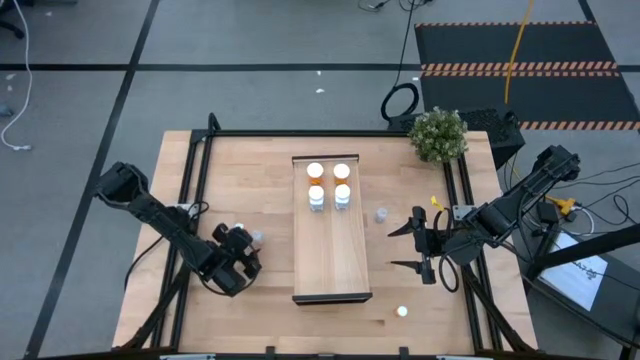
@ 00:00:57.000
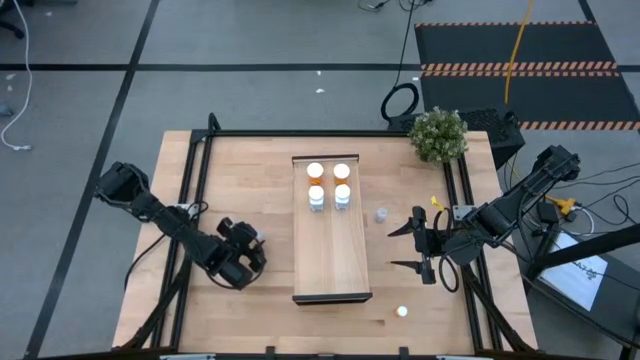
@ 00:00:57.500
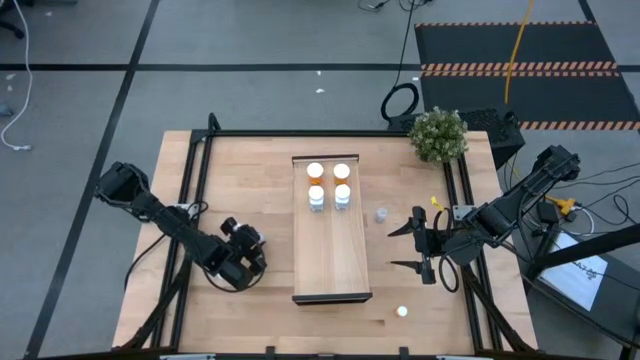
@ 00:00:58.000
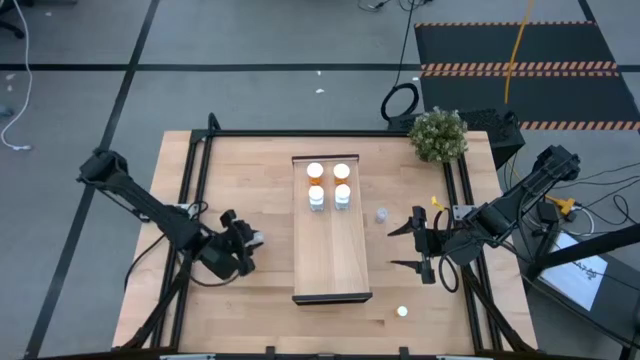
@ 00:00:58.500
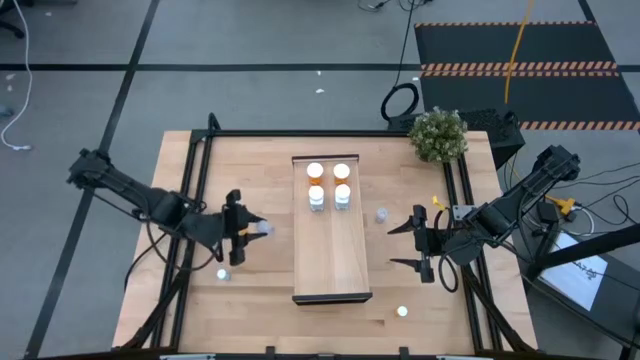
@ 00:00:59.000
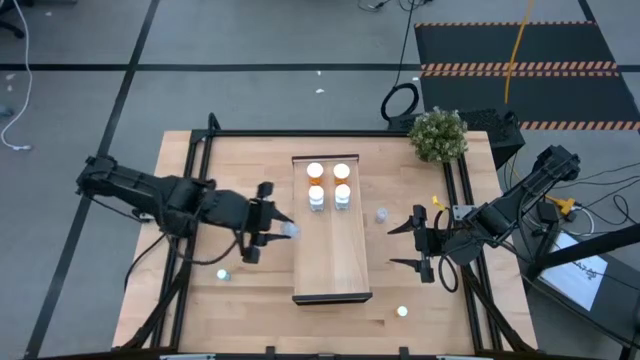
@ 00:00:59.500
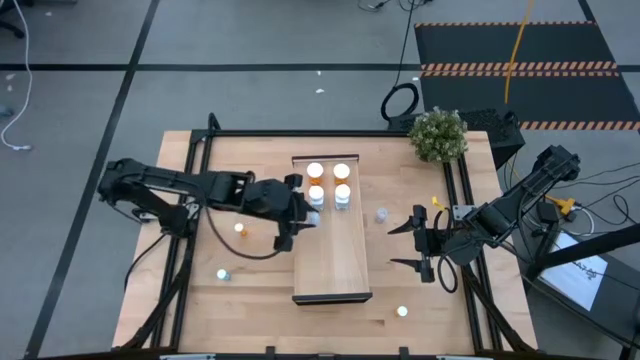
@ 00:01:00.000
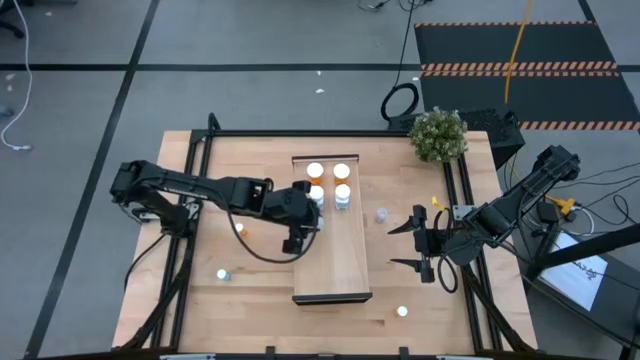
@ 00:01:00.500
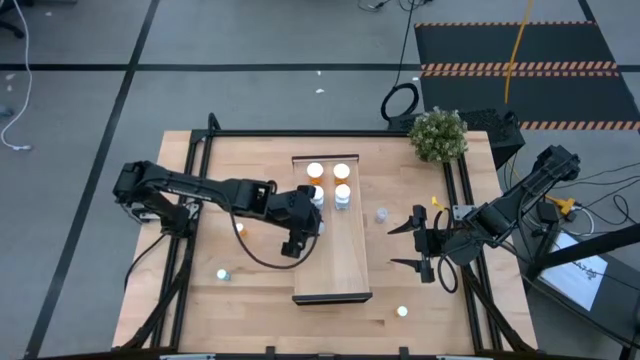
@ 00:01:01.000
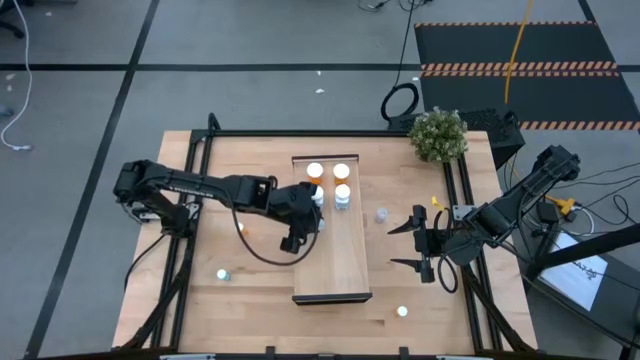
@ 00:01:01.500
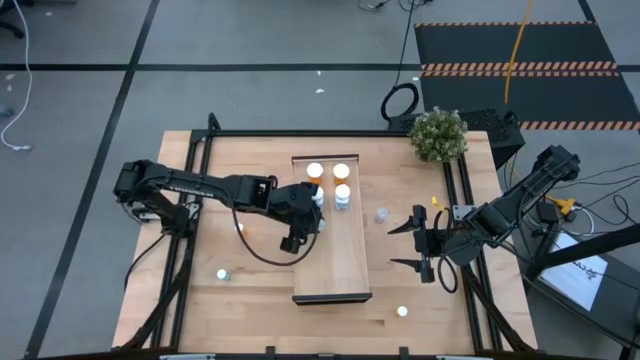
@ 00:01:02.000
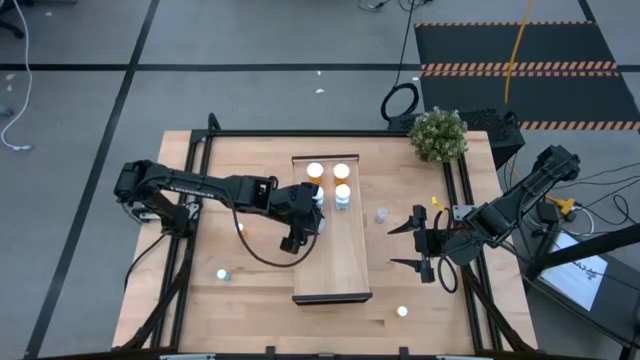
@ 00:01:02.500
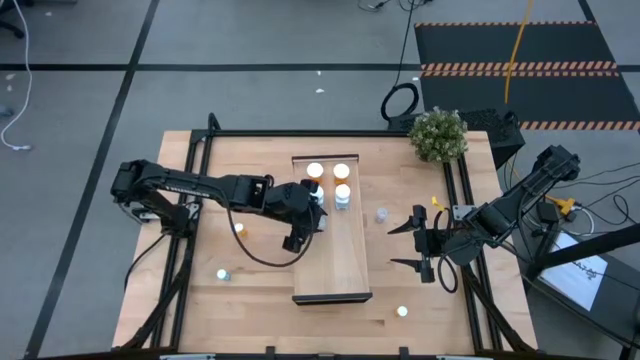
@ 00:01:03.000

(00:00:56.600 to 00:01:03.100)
Task: Pick and place medicine bottles onto shelf by color
Put the bottom transparent pill bottle on the shelf

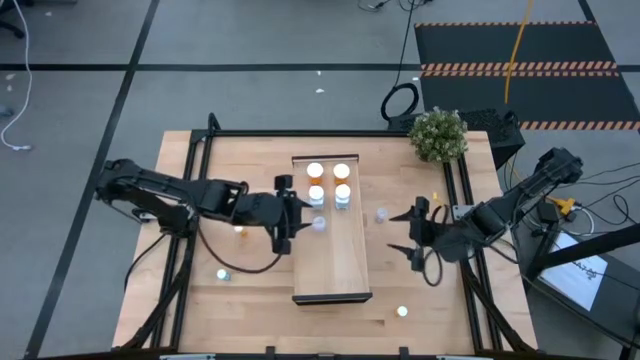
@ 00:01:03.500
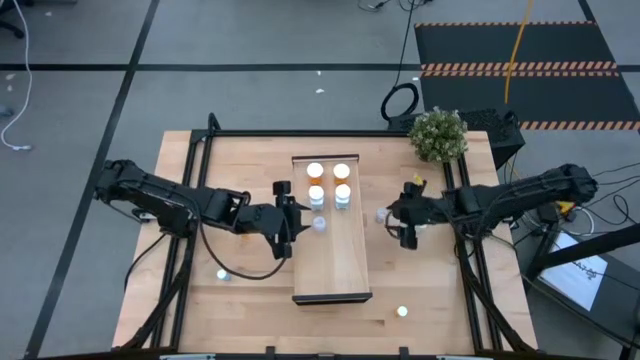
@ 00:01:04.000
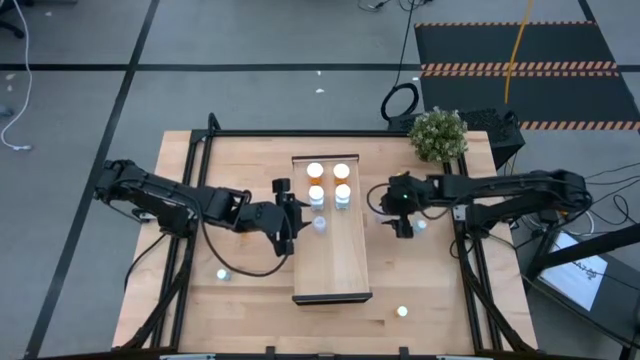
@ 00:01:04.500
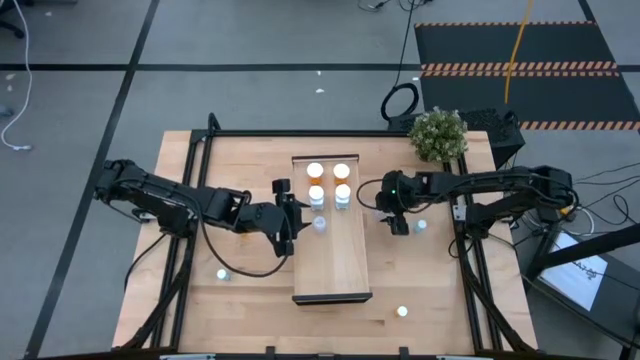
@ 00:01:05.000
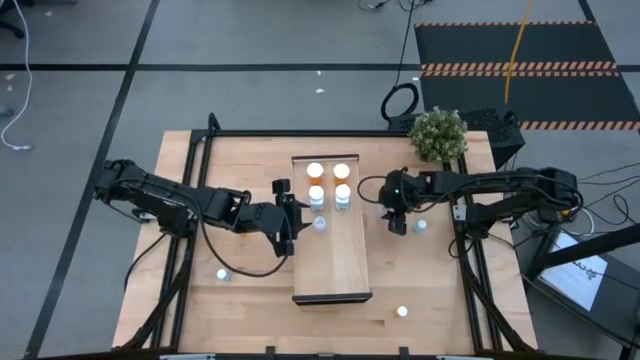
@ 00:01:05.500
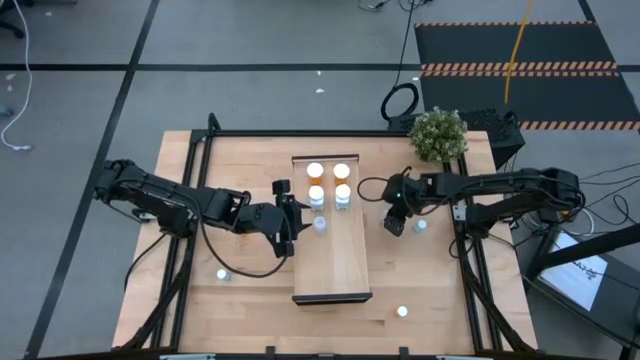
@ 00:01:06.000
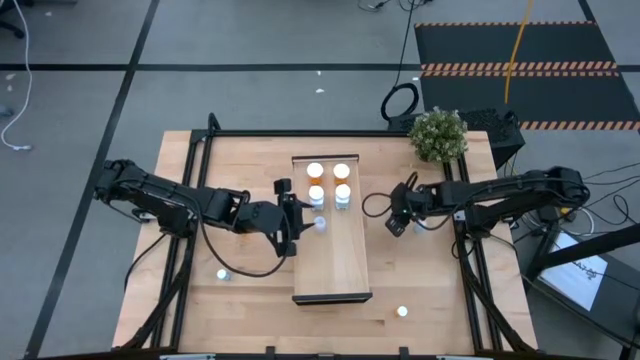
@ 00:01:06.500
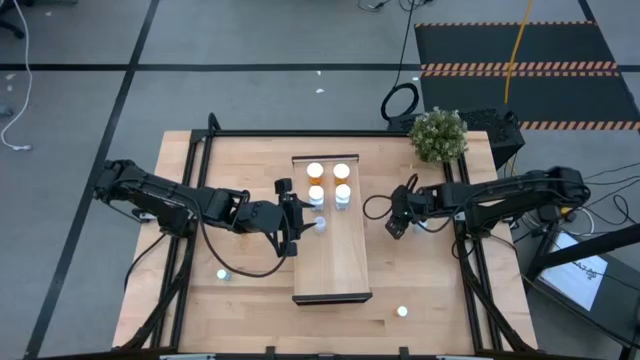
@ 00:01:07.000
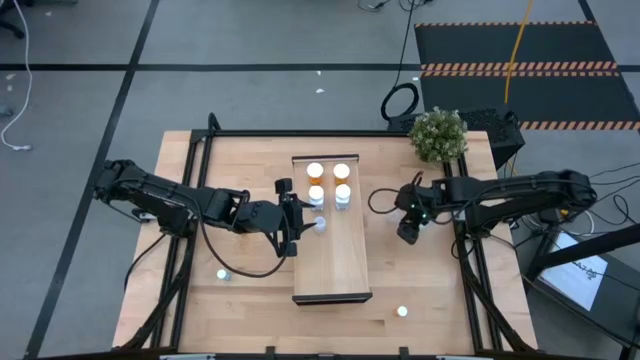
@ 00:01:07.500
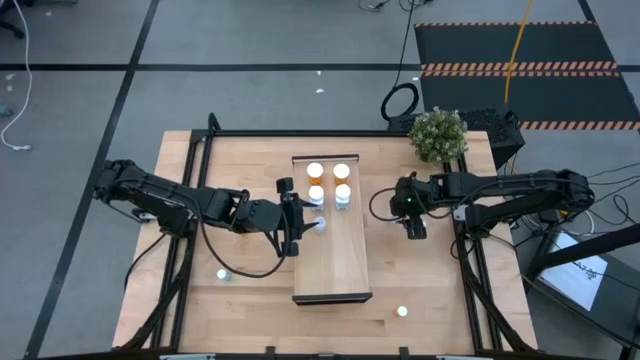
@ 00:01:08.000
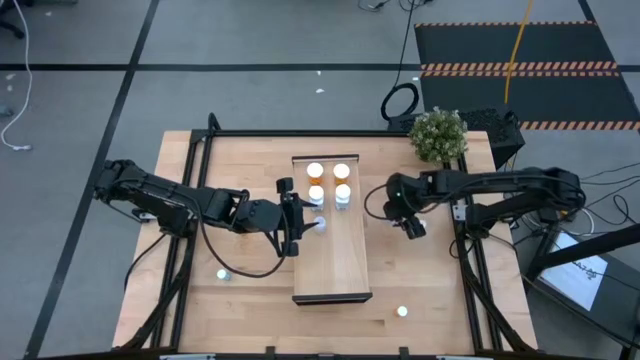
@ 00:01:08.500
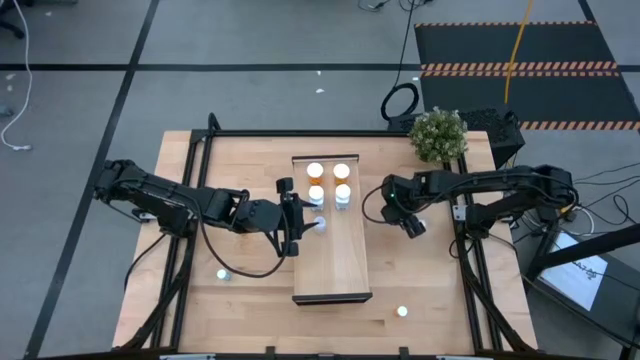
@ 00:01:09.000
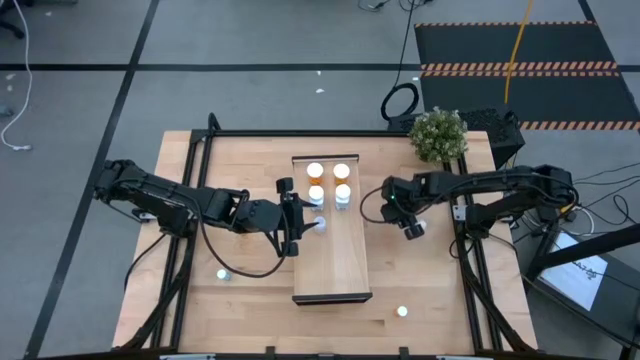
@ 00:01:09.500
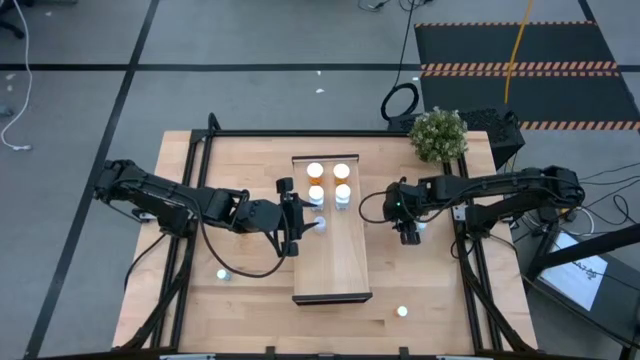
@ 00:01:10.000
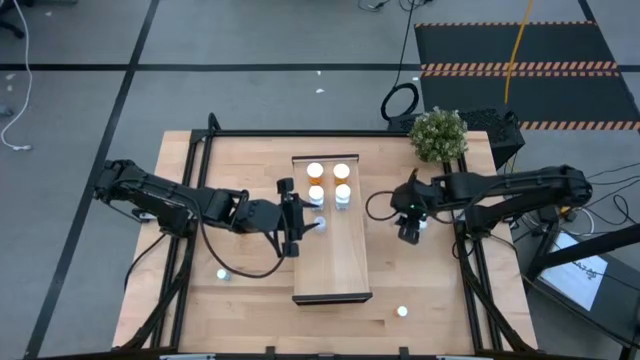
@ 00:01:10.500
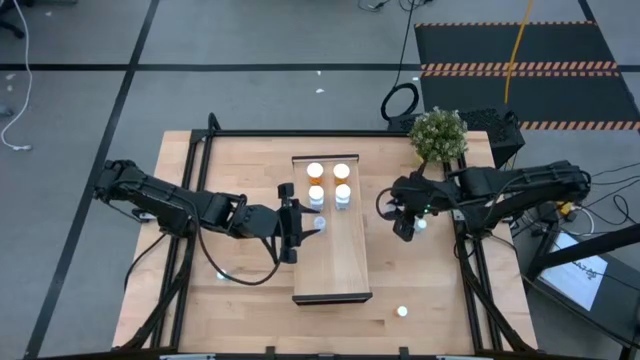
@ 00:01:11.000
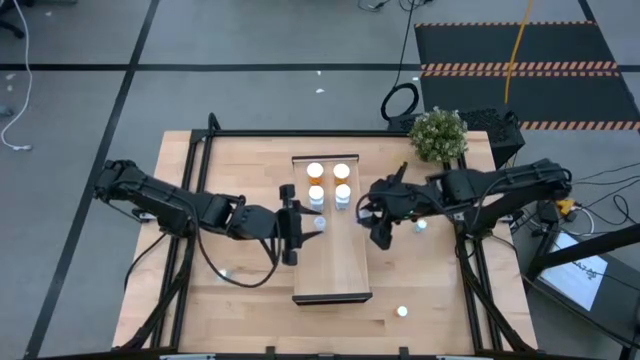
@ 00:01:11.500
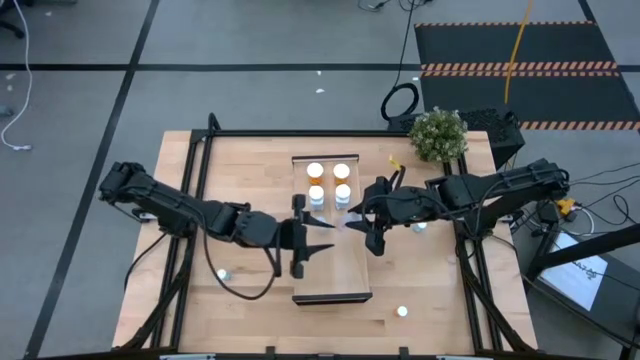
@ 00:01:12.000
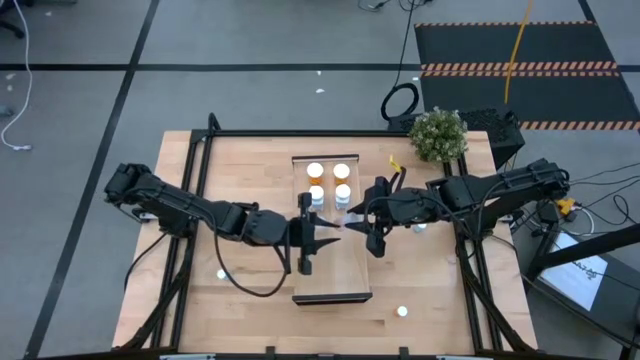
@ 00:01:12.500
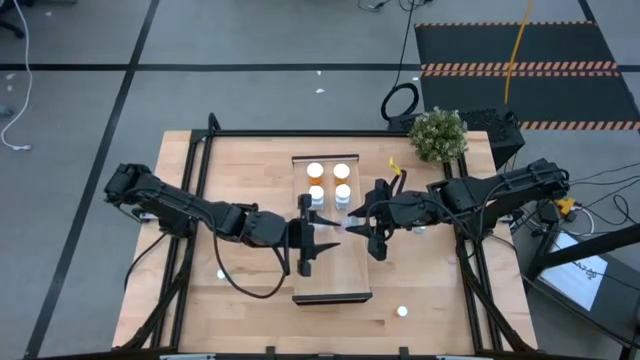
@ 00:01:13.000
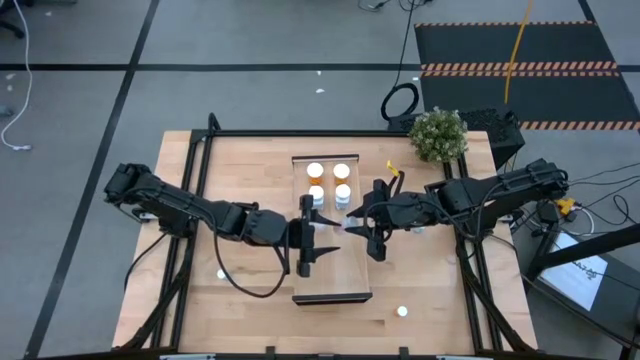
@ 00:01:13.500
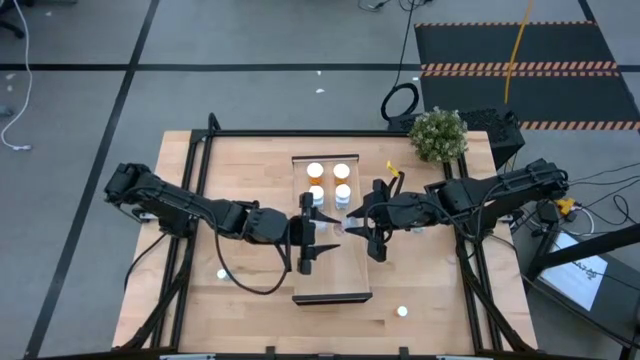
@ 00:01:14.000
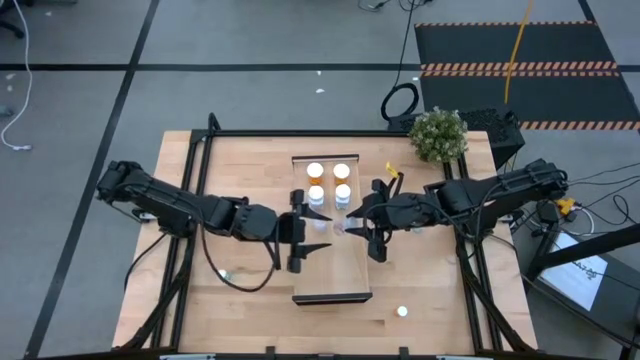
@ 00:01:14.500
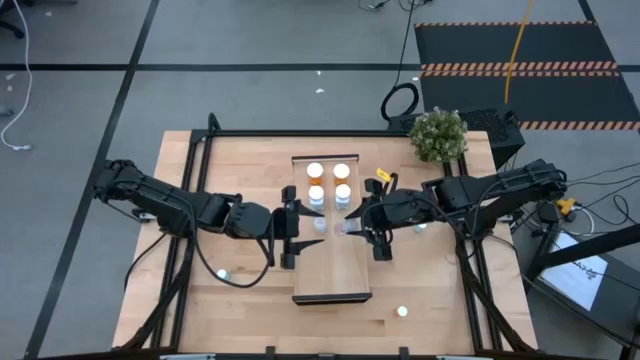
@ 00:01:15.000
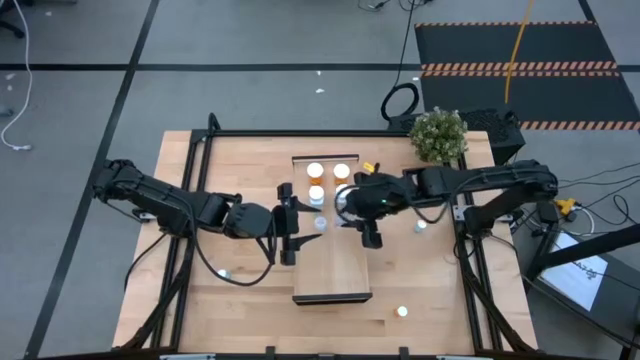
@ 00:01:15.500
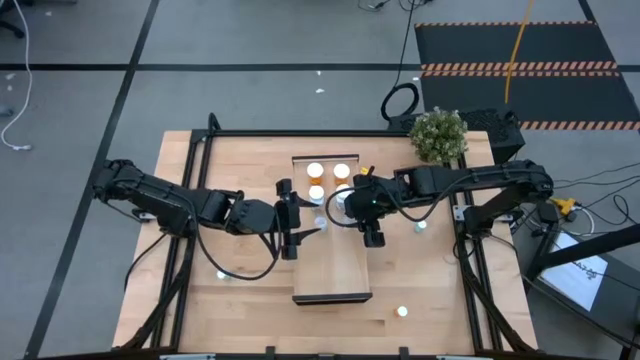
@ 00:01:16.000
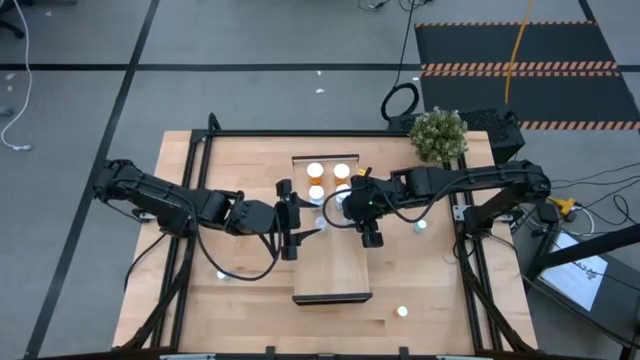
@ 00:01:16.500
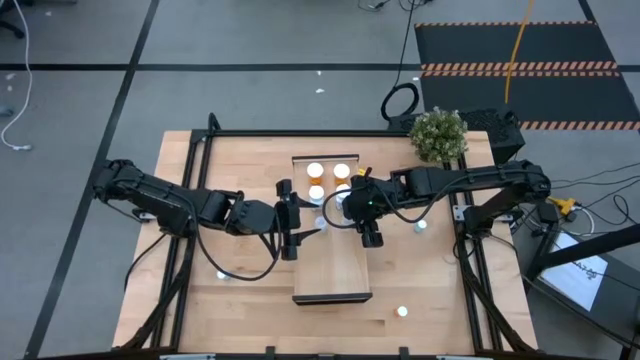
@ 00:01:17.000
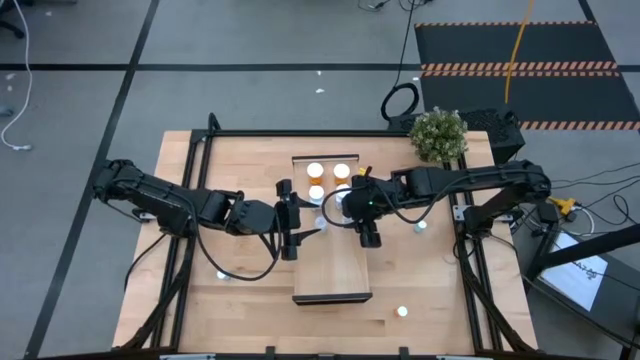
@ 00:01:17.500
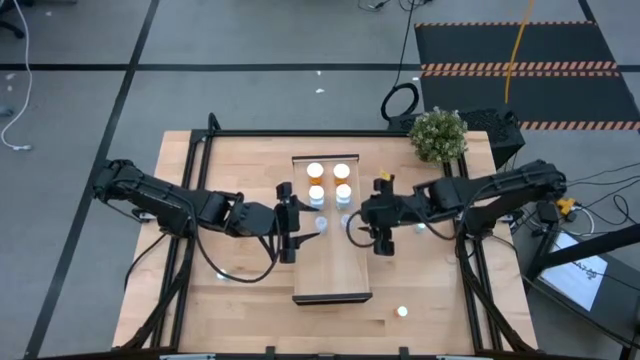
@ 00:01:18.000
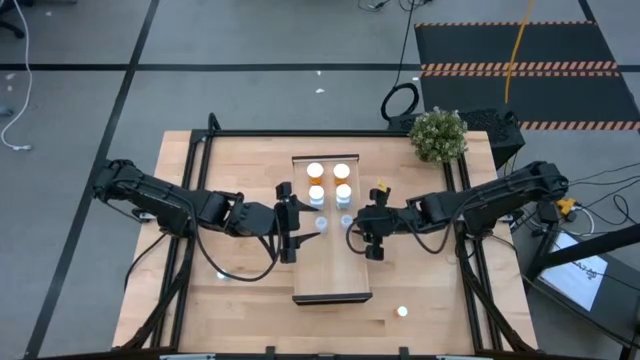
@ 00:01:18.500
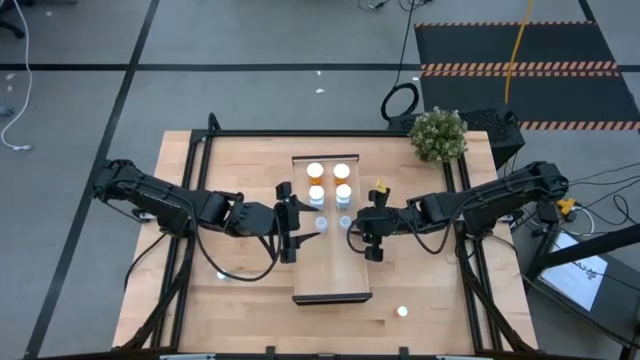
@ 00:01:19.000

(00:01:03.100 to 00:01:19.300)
Put the transparent pill bottle on the shelf aligned with the other transparent pill bottle
